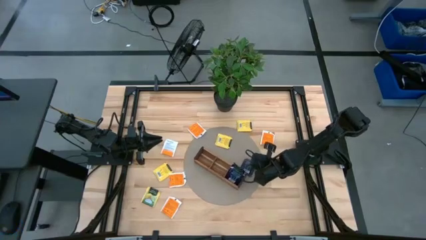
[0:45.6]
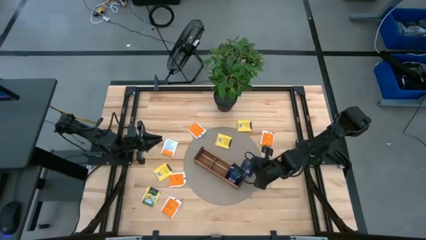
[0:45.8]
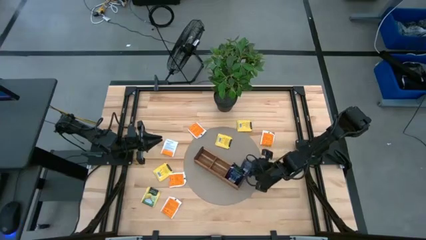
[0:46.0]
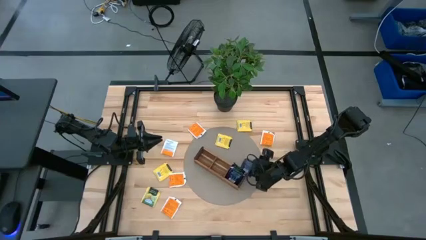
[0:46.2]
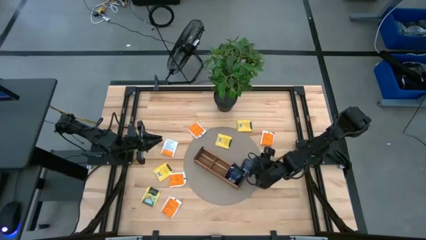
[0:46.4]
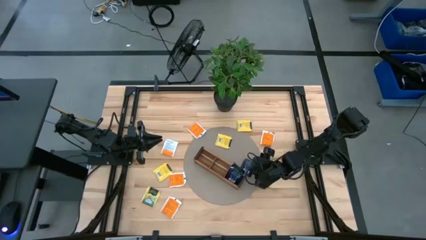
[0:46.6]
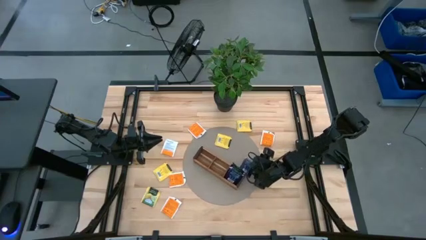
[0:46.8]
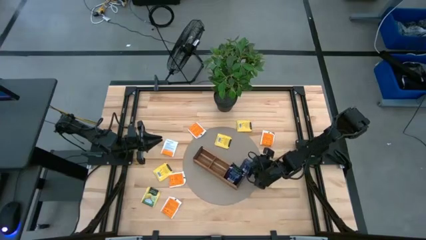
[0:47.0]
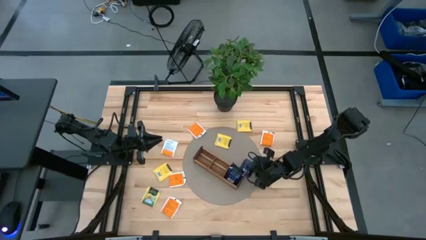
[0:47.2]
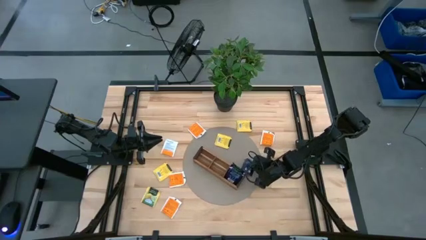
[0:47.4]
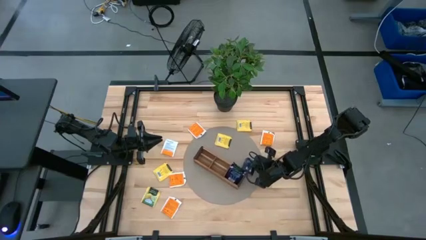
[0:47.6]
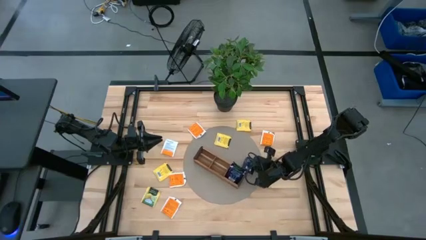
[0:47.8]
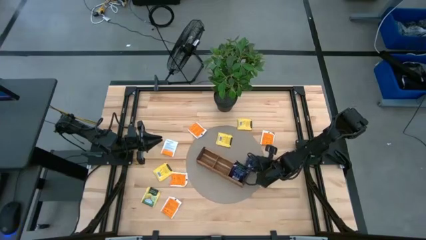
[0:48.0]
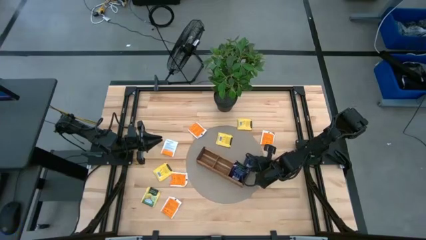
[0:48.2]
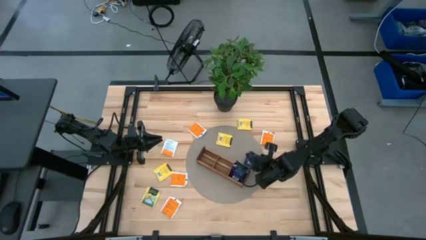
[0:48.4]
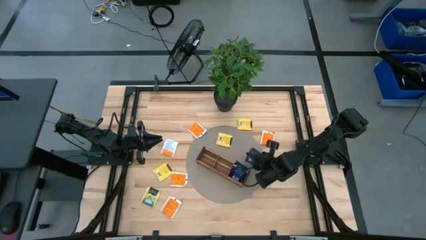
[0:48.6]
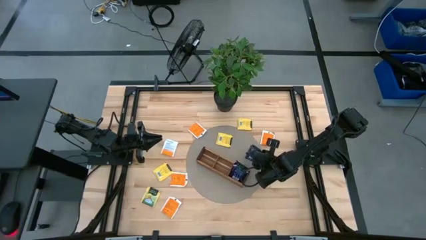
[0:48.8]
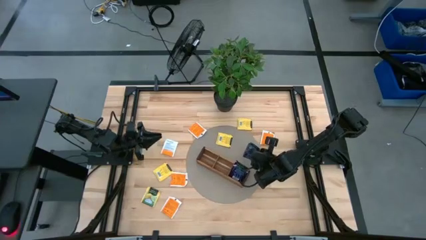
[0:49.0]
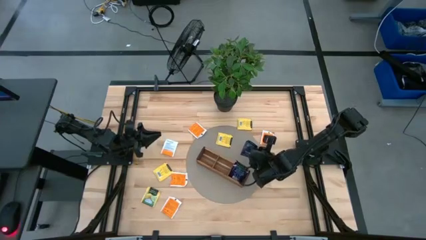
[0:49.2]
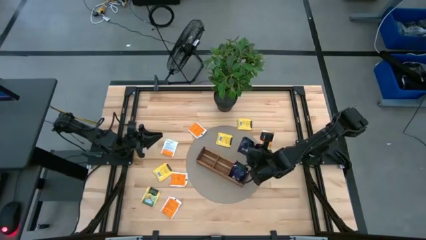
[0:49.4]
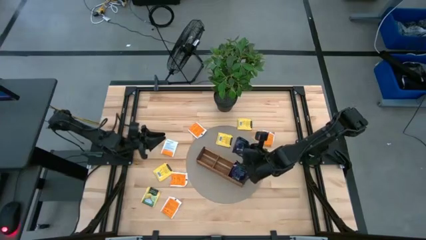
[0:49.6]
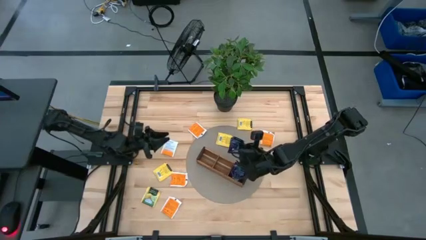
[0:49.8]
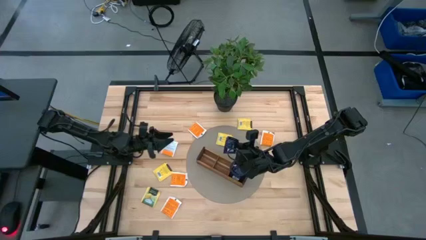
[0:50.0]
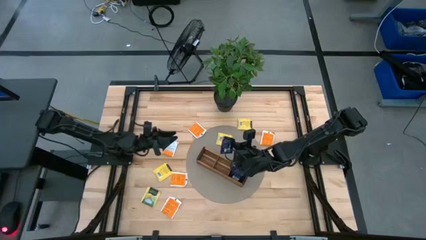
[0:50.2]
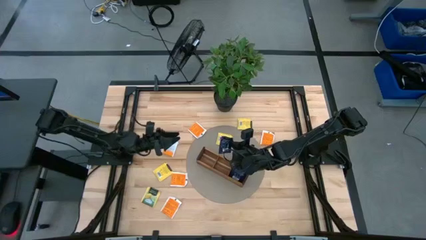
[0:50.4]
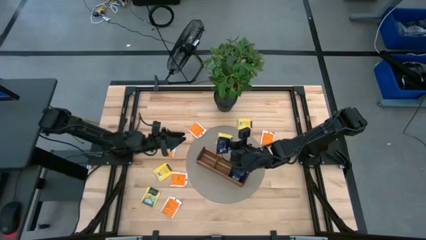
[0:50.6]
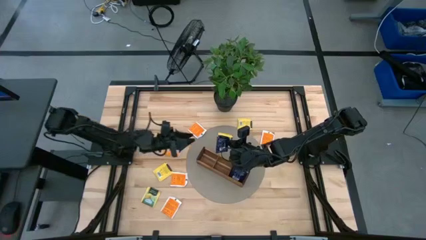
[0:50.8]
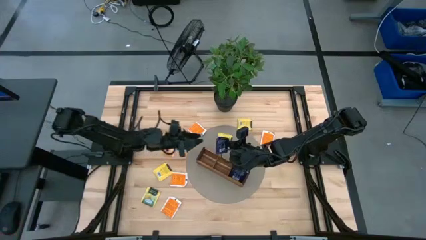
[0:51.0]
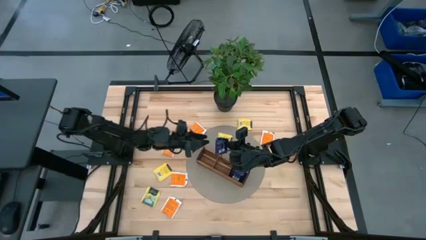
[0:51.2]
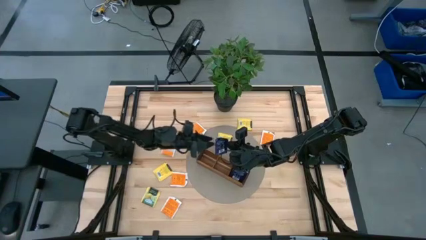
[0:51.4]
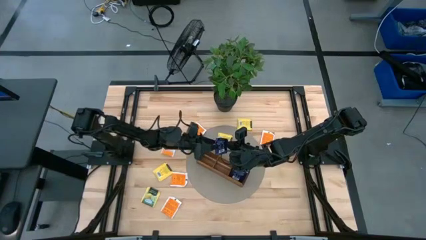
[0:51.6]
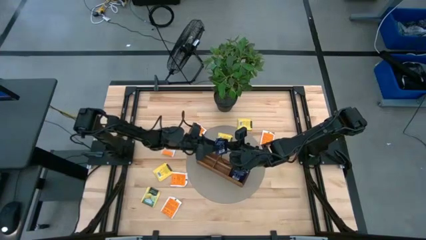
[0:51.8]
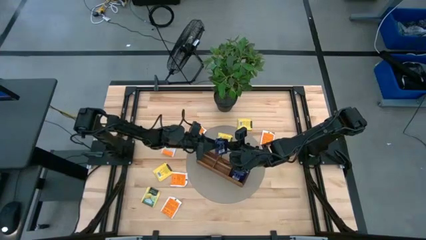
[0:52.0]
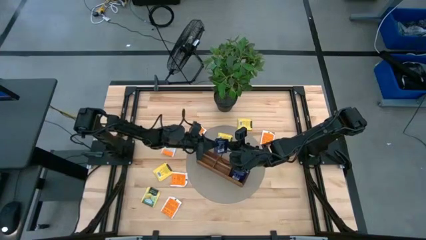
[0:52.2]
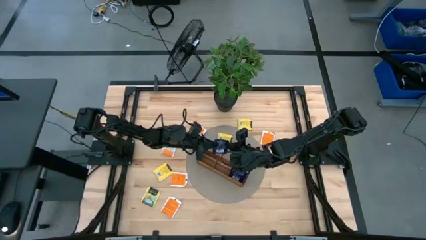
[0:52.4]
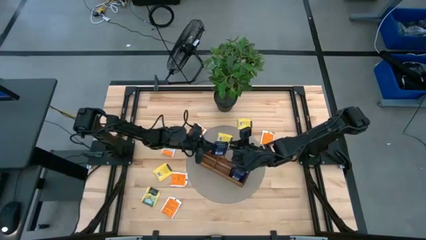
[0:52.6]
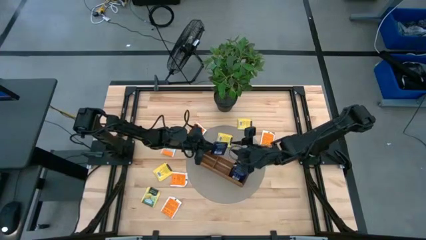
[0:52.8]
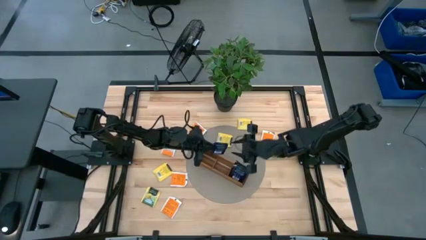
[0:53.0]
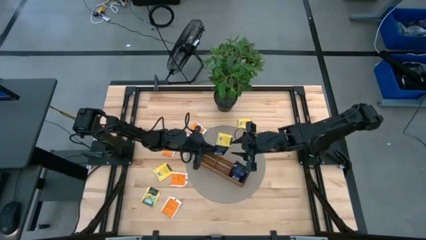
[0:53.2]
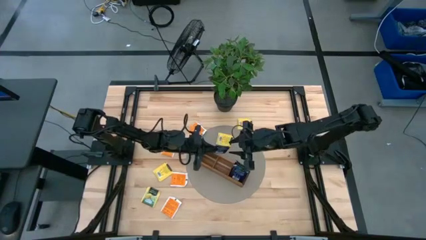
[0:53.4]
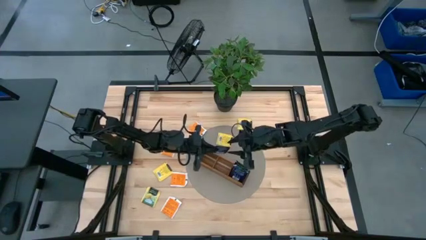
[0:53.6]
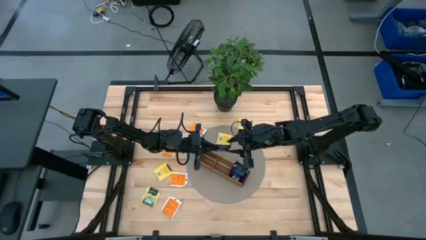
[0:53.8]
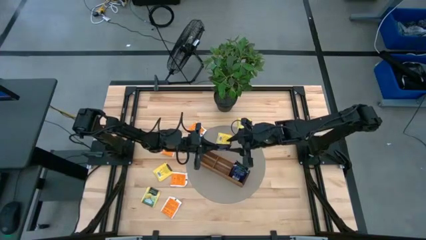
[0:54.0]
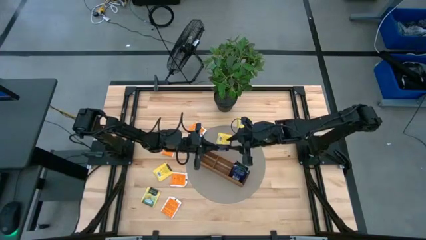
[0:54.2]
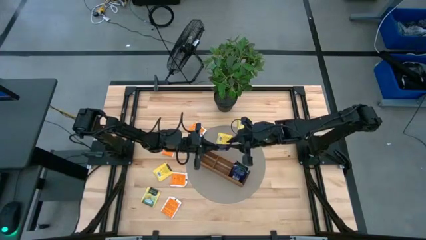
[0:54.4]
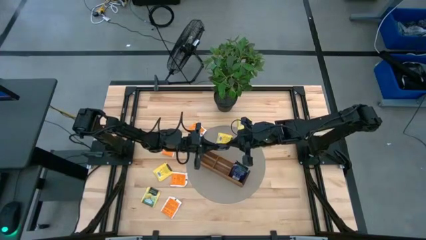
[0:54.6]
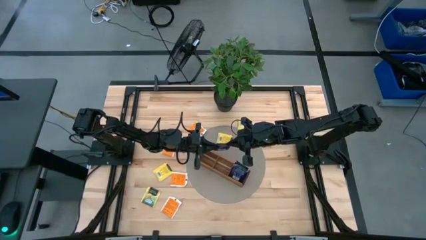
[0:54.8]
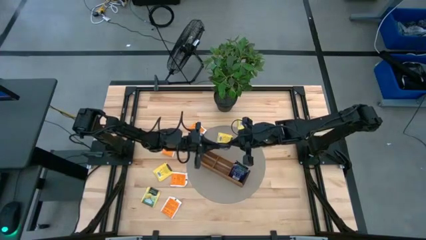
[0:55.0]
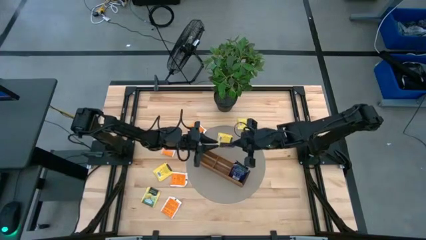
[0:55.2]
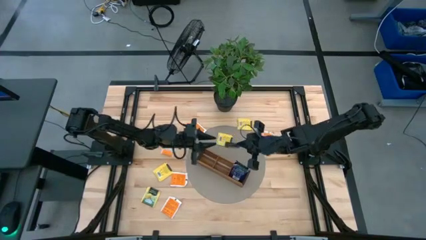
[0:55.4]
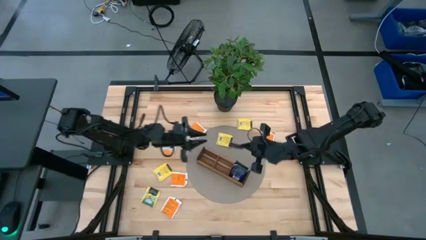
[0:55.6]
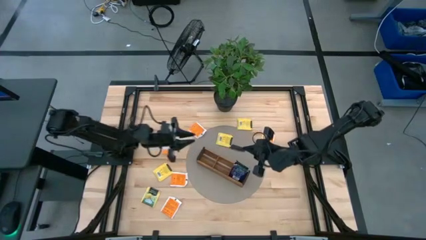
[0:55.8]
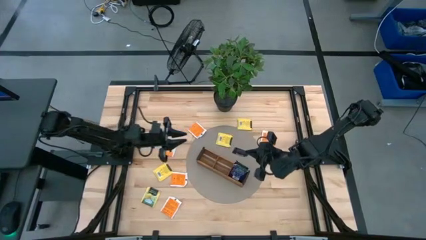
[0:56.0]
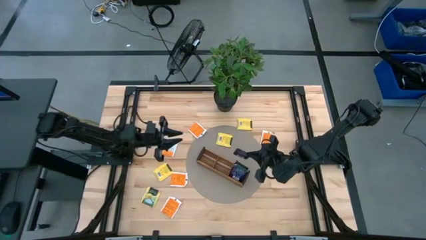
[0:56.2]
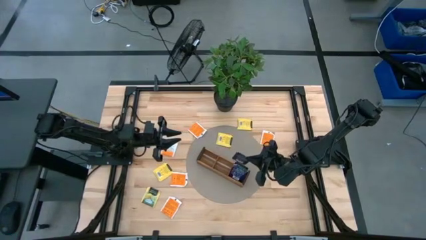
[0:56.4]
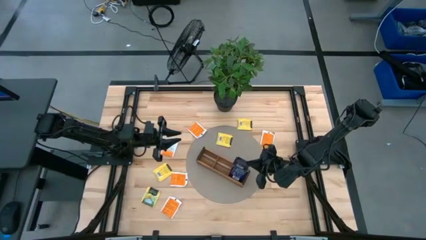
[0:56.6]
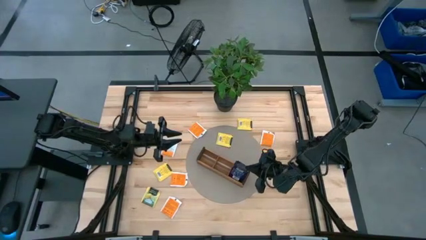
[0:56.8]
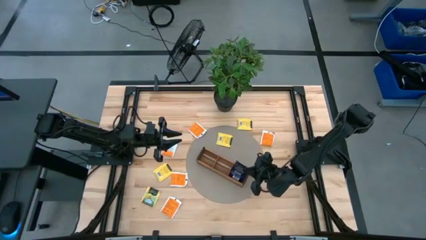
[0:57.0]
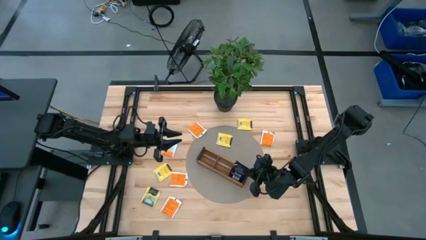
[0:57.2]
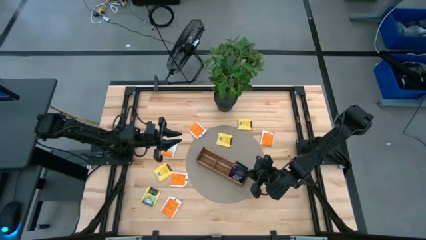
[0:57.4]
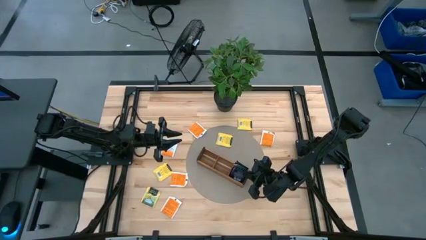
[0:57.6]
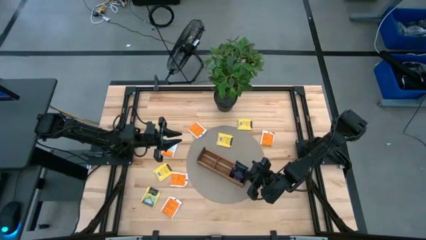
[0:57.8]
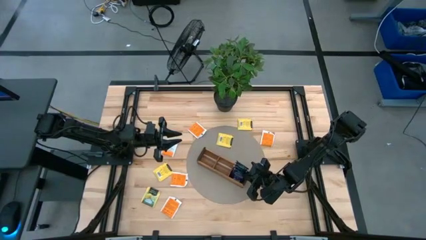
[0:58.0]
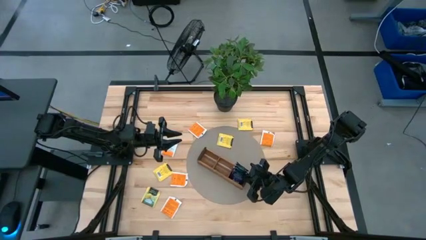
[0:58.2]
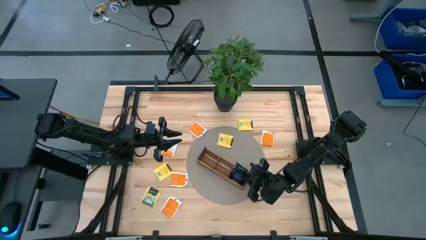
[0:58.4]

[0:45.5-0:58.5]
Task: Pick & Place Tea
Put the black tea bag into the right section of the wooden organizer

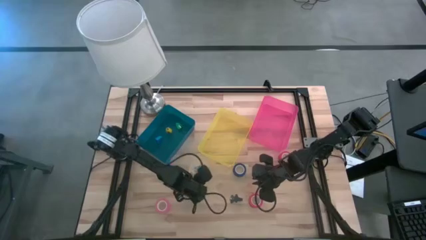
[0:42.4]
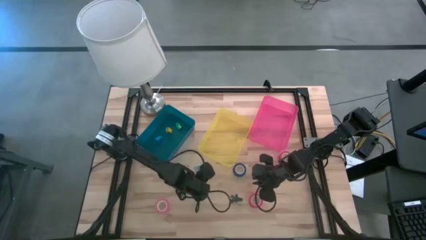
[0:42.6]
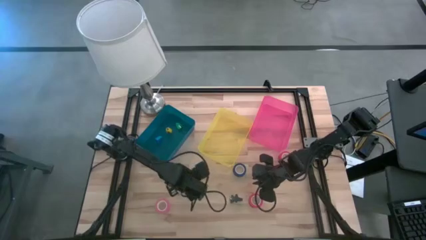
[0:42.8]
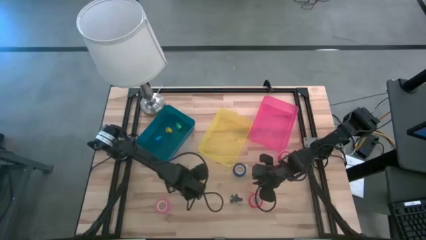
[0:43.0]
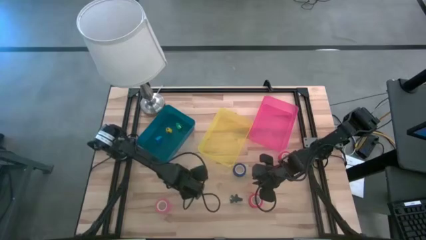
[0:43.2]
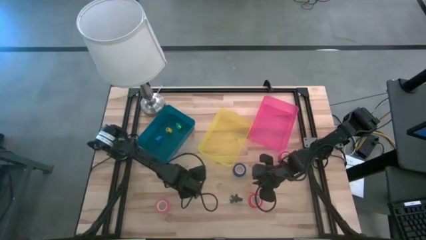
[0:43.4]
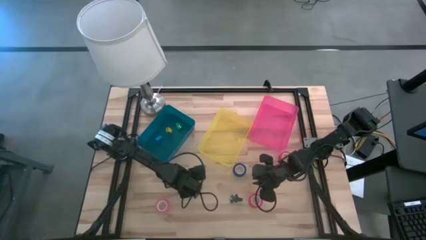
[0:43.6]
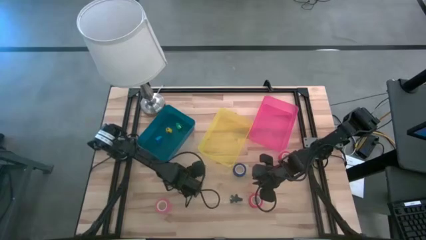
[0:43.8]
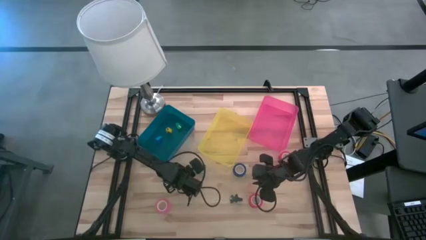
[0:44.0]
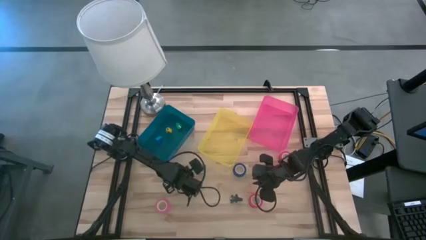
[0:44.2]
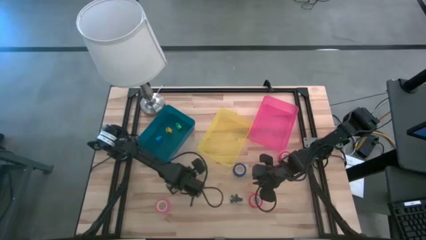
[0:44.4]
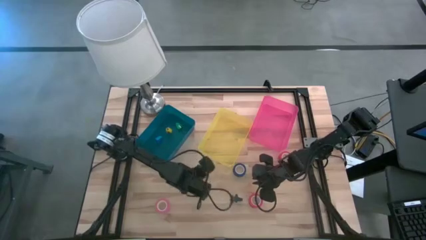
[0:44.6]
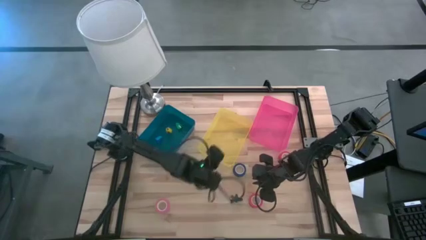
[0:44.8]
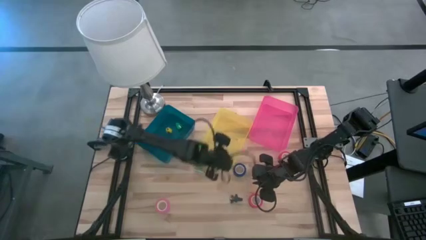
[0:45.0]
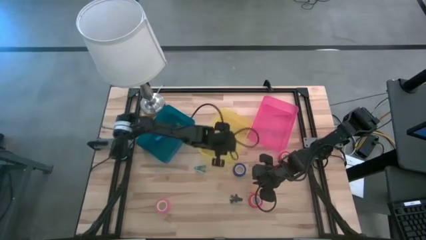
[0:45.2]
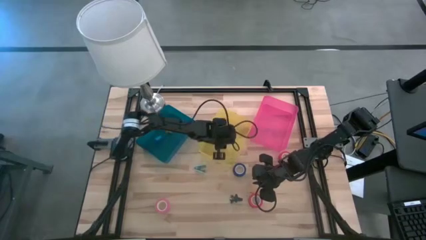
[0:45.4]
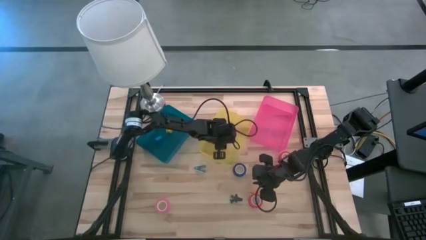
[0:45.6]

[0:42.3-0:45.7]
Task: Pick and place Stapler, Stapler remover, tape
Put the bottom light blue staple remover into the yellow bin
